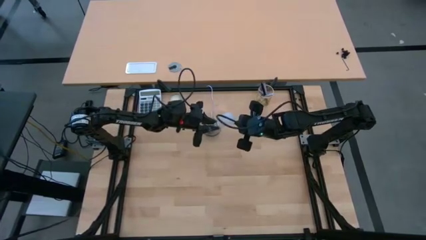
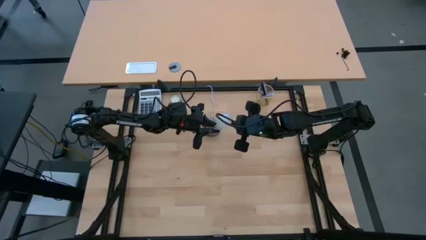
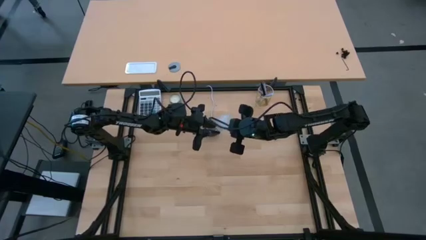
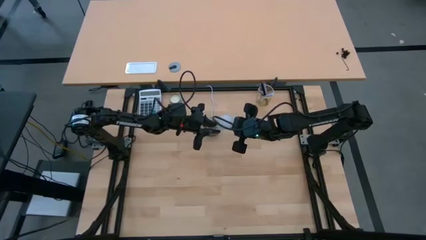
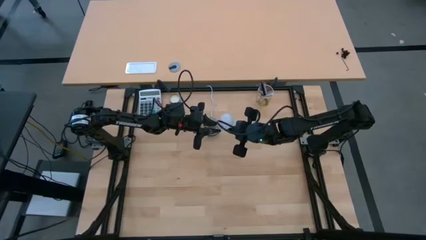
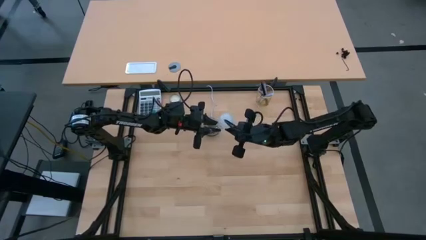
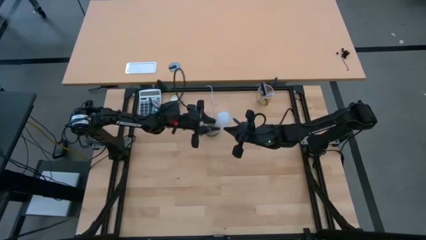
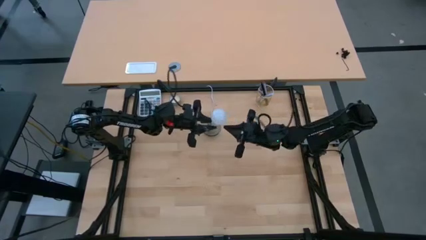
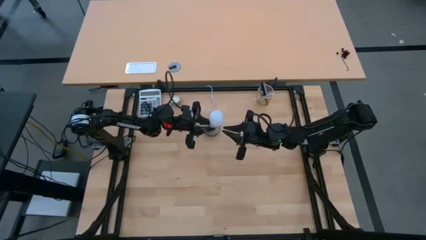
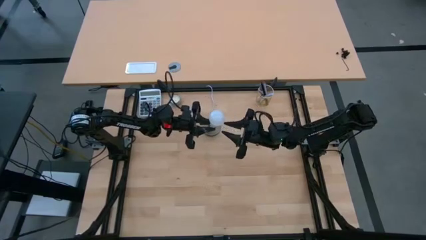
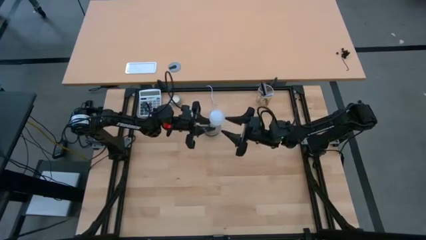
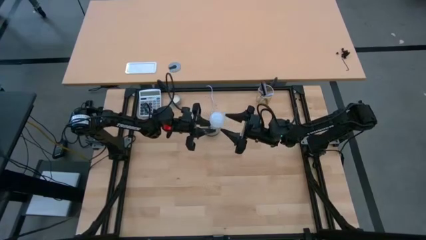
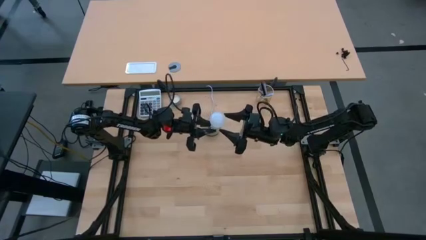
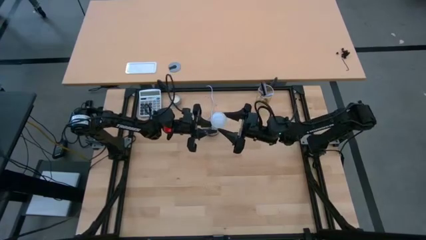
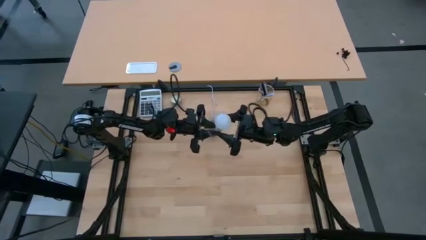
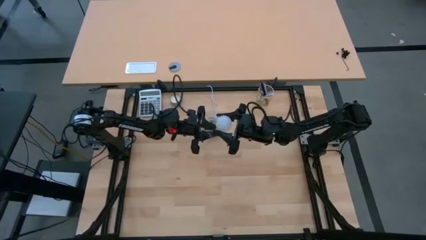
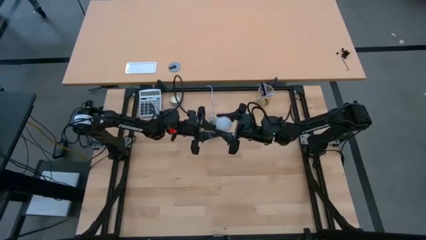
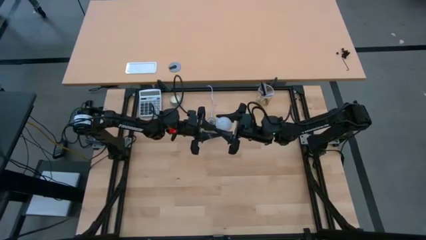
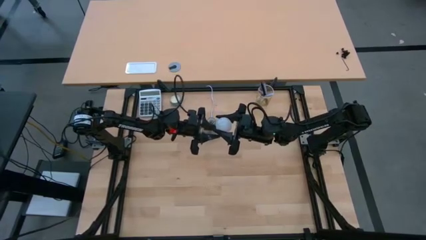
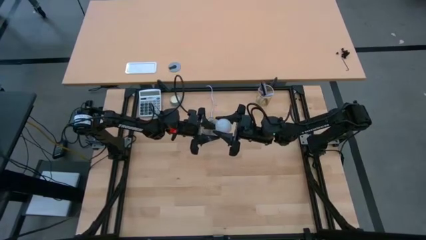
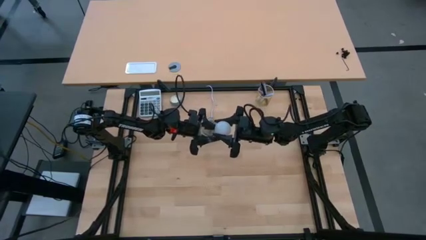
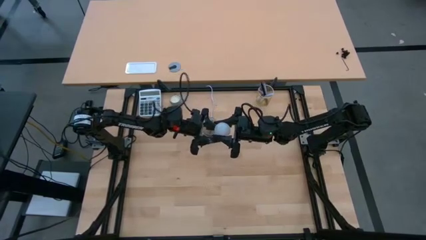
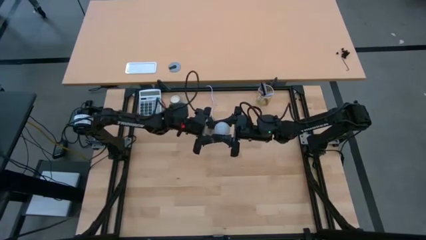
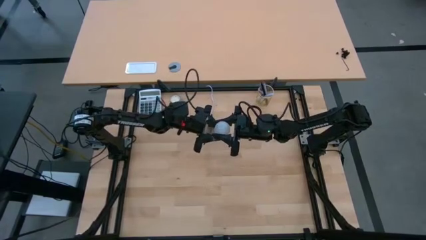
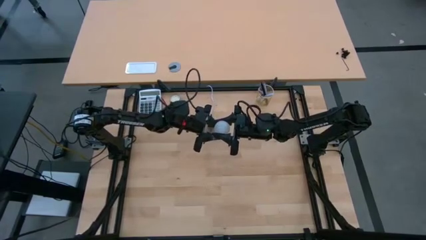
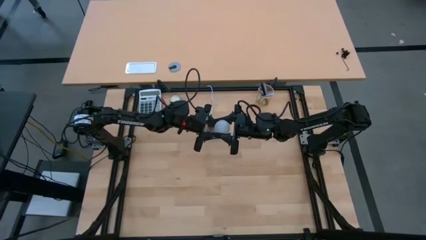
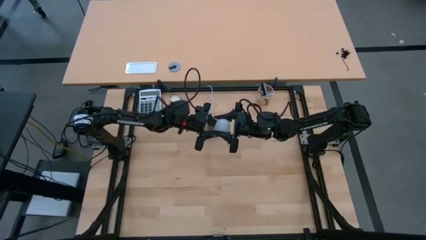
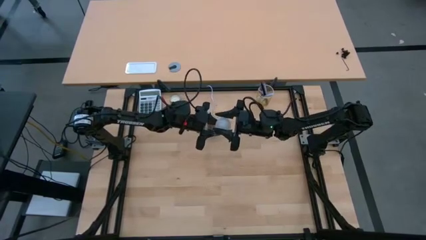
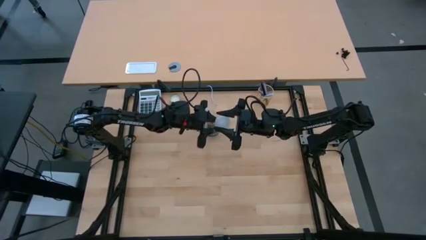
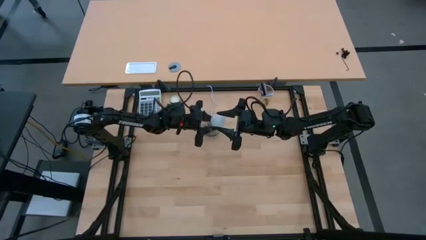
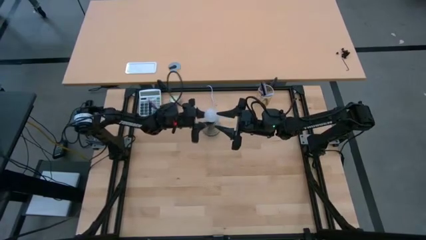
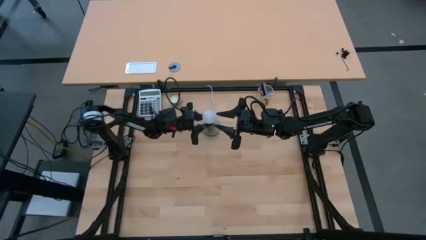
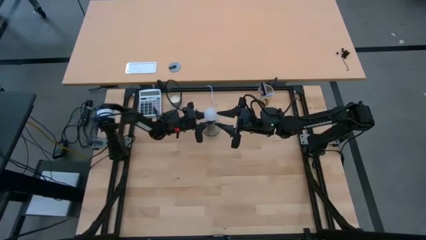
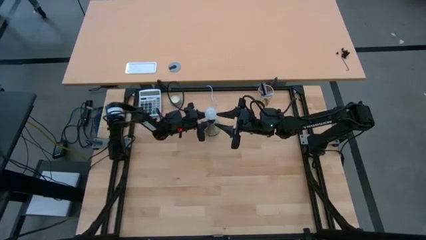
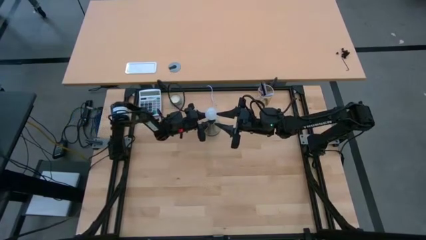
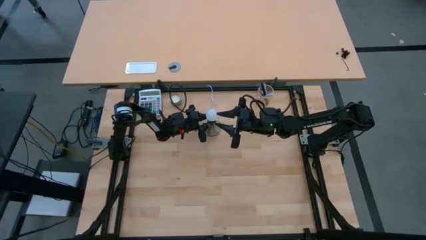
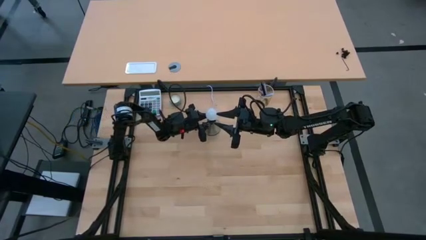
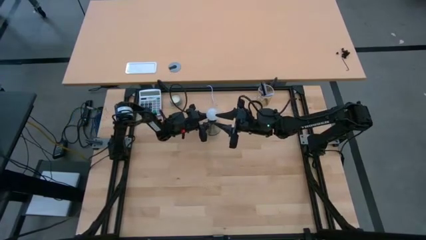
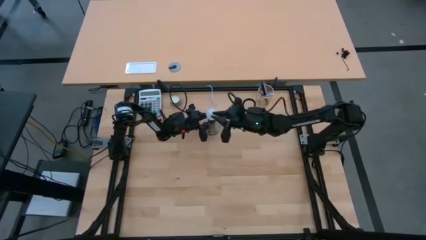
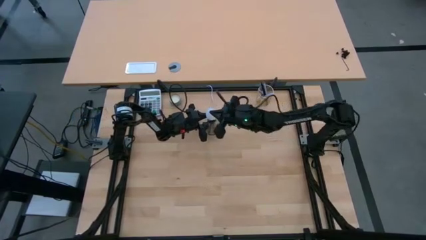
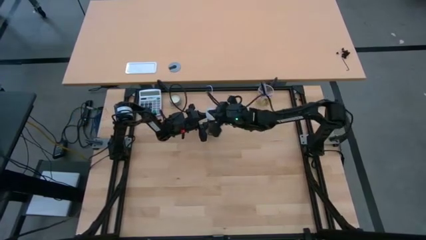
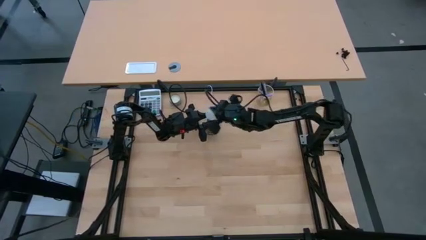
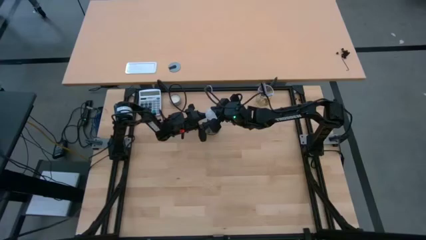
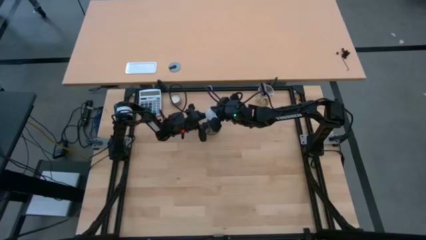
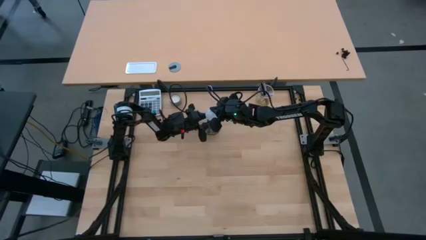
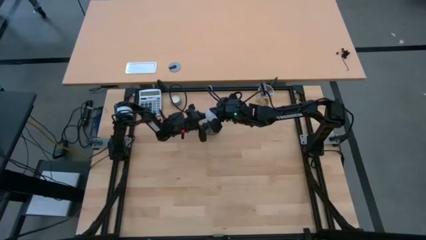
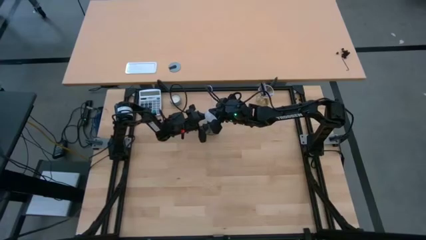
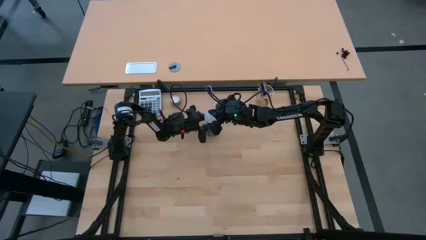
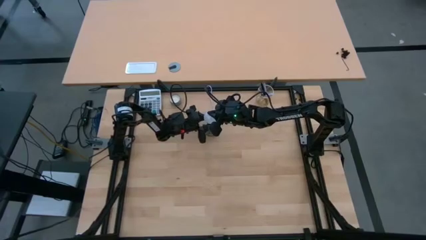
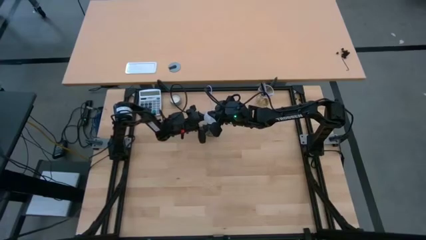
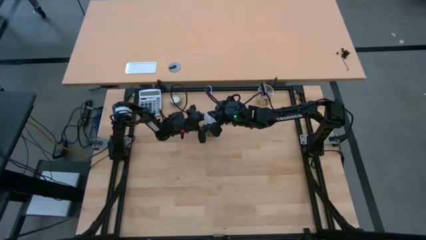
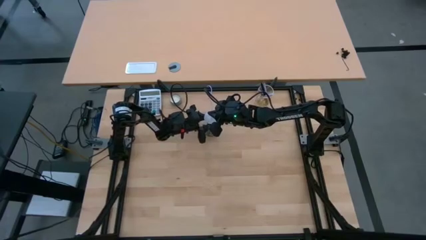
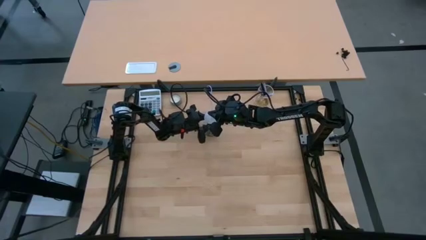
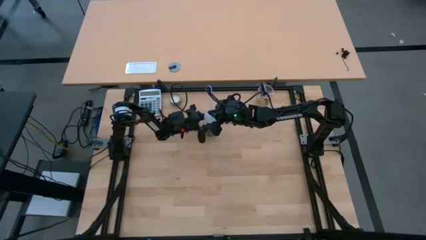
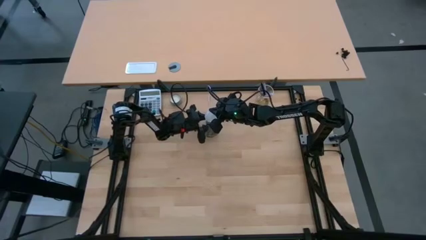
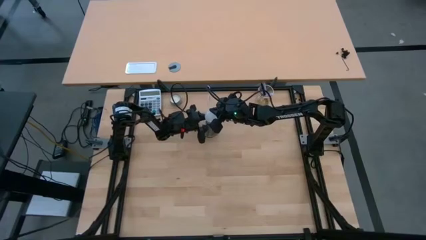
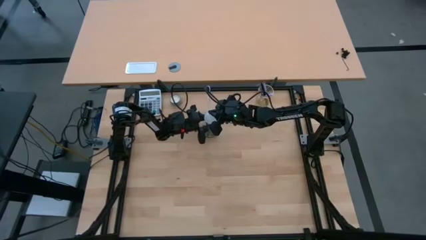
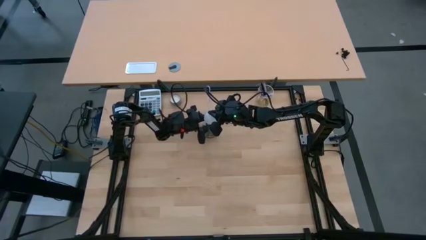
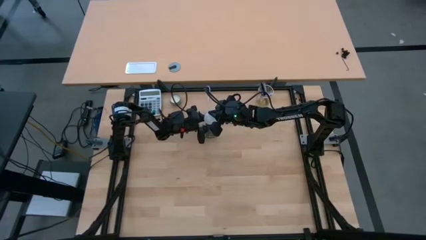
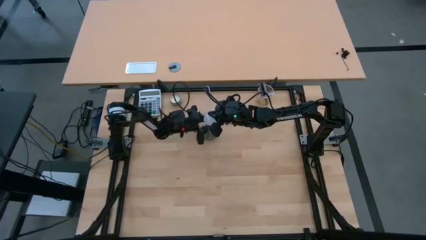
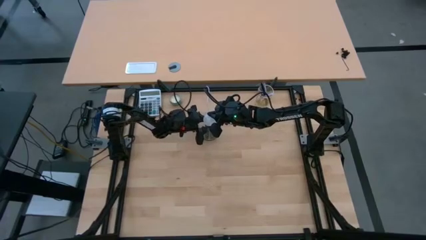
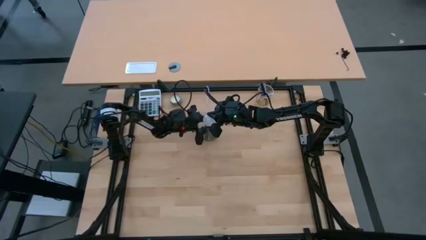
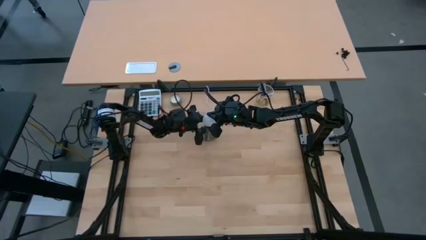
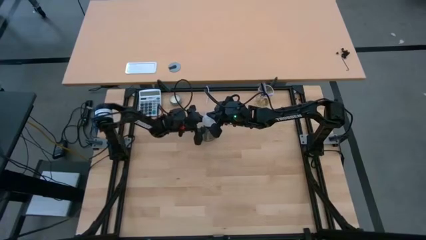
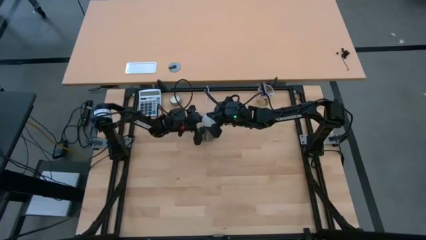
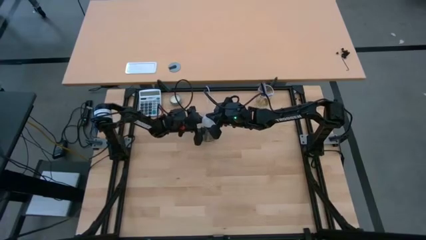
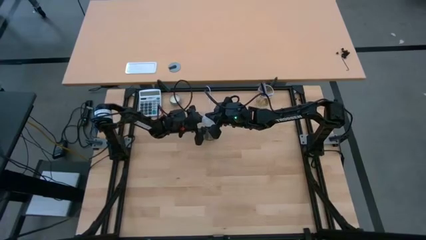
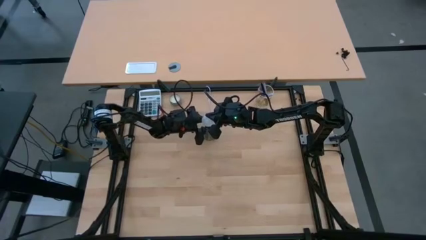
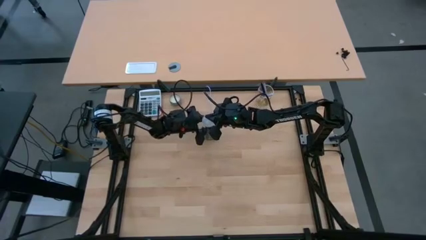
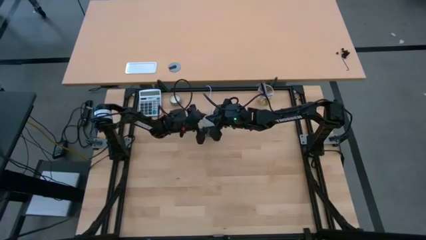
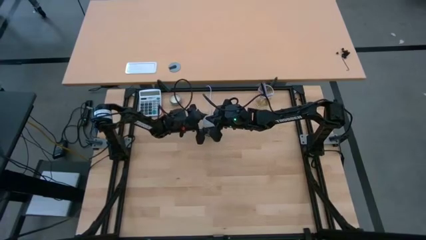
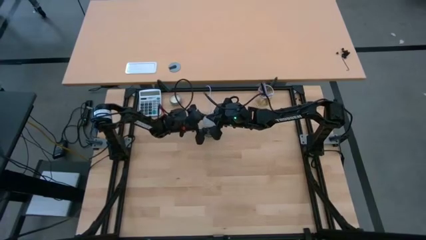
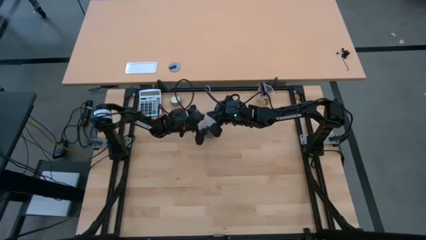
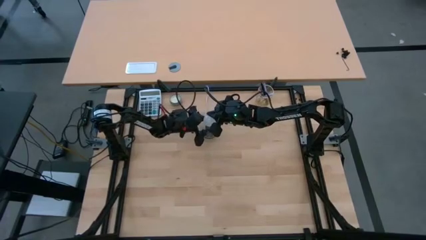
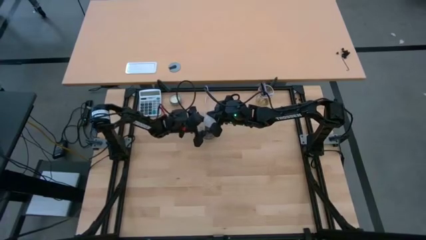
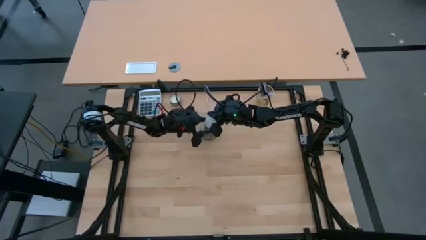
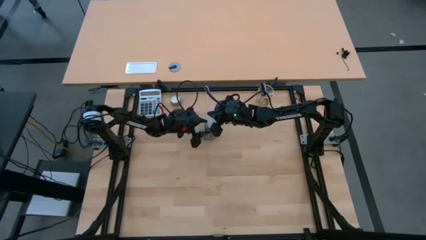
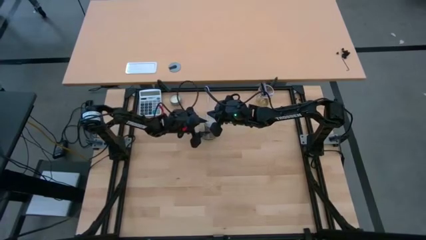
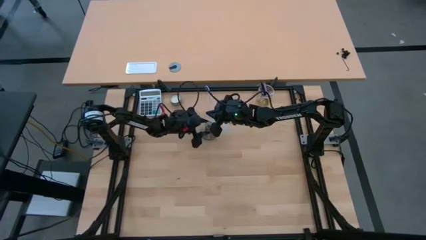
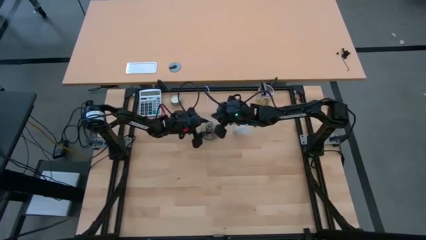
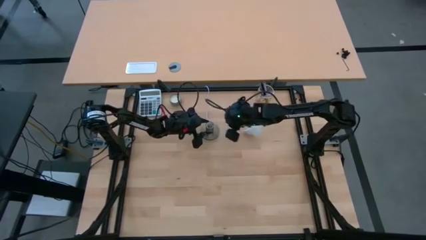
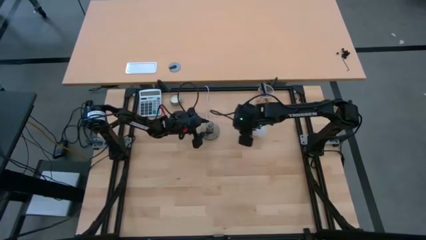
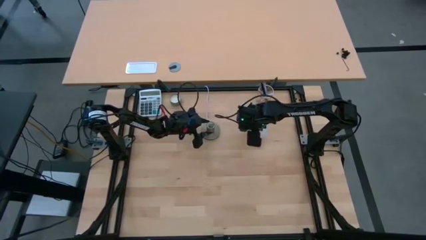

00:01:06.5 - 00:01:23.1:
Task: Screw lightbulb
Insert the lightbulb into the lamp
